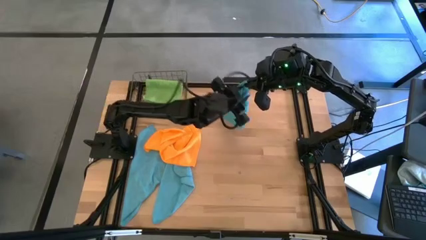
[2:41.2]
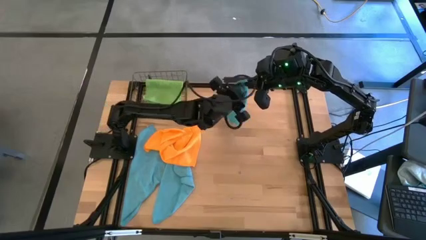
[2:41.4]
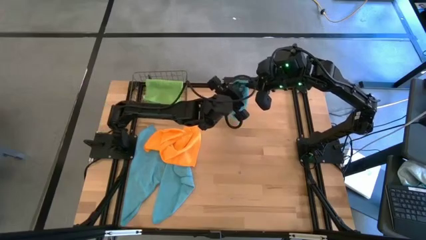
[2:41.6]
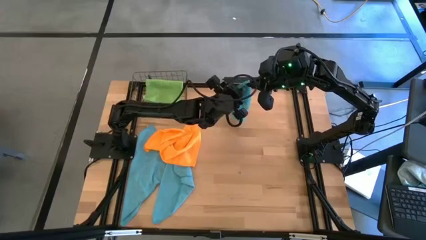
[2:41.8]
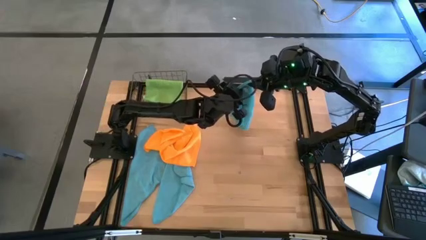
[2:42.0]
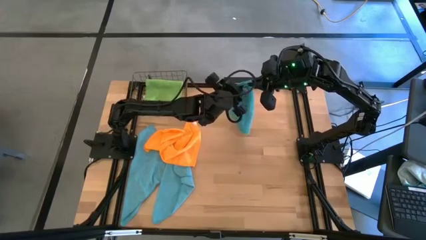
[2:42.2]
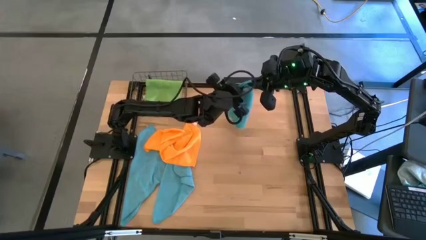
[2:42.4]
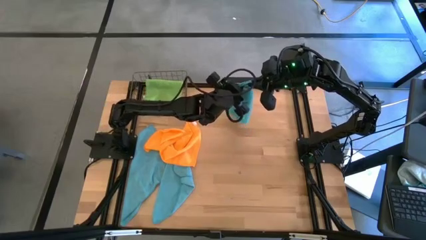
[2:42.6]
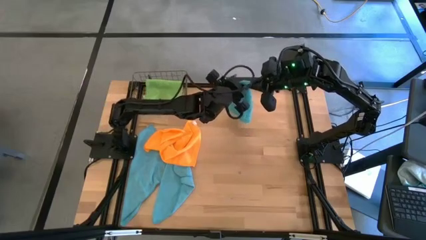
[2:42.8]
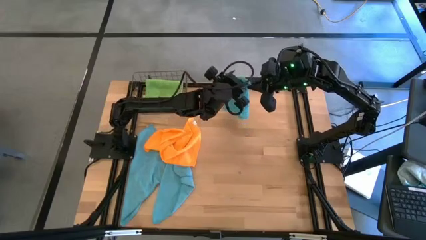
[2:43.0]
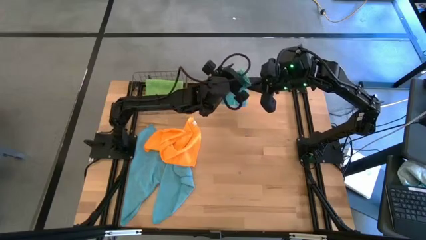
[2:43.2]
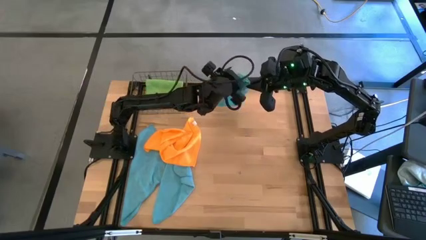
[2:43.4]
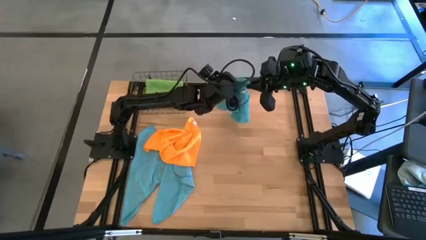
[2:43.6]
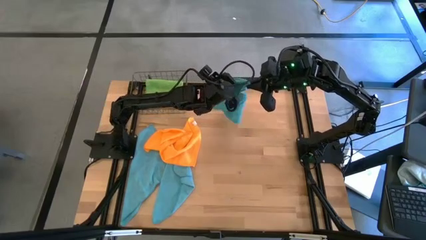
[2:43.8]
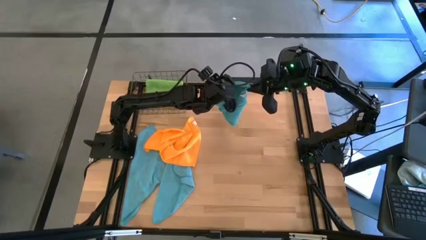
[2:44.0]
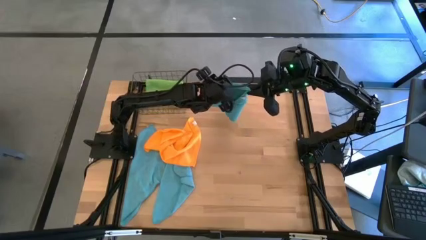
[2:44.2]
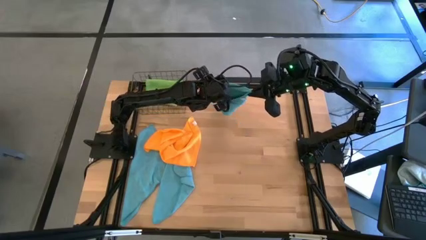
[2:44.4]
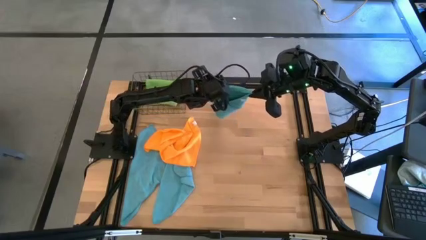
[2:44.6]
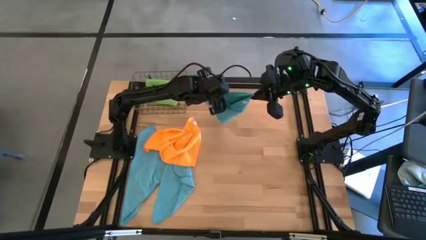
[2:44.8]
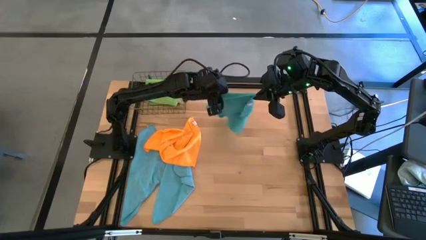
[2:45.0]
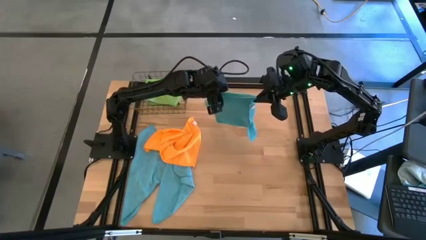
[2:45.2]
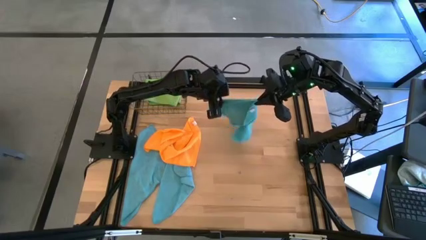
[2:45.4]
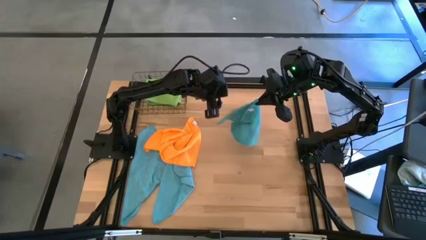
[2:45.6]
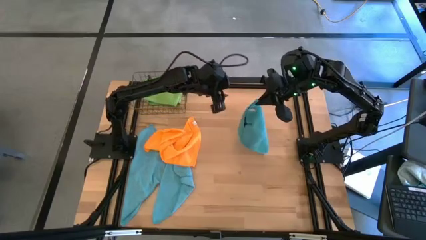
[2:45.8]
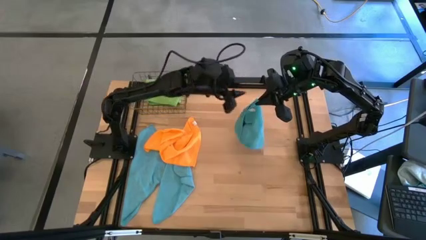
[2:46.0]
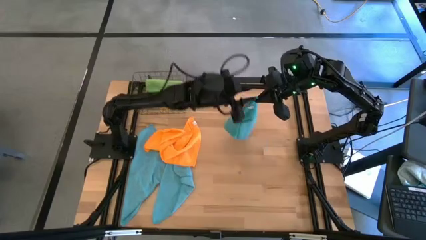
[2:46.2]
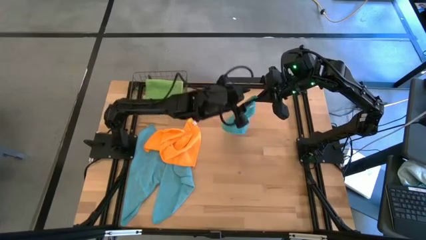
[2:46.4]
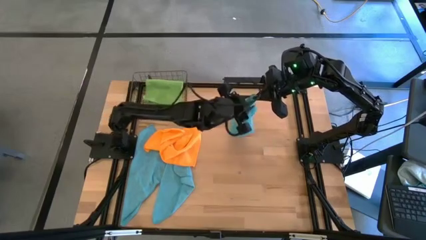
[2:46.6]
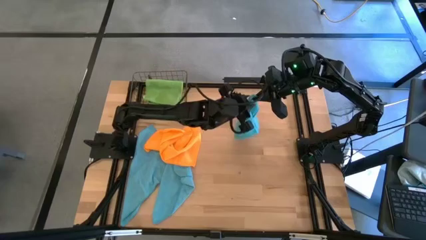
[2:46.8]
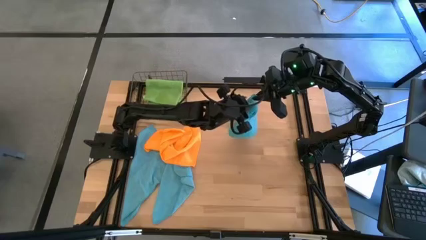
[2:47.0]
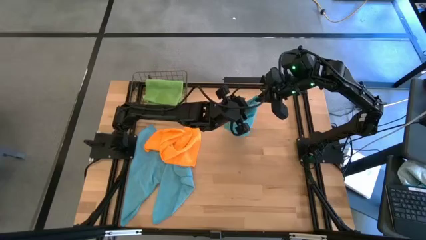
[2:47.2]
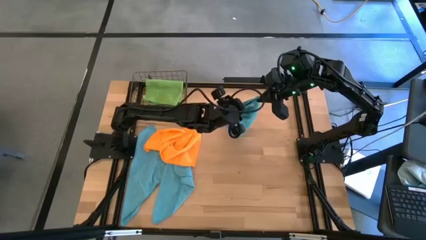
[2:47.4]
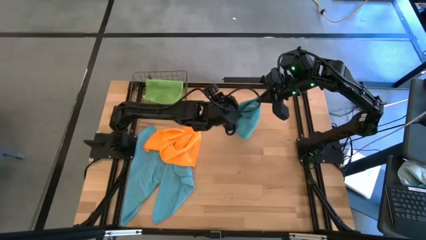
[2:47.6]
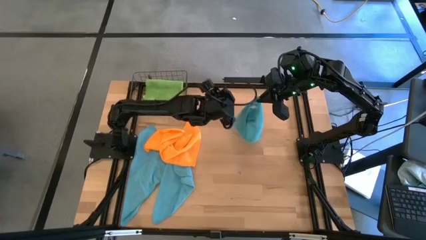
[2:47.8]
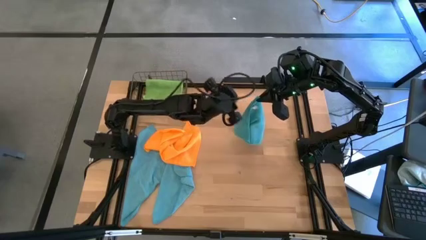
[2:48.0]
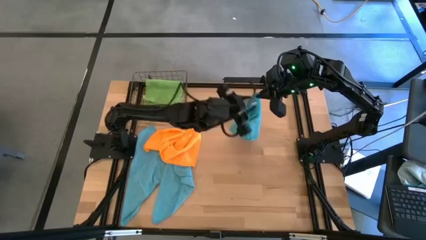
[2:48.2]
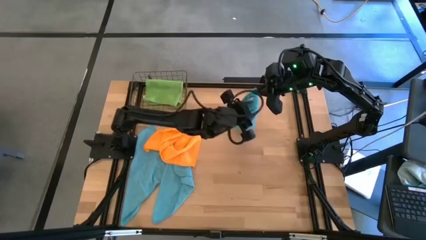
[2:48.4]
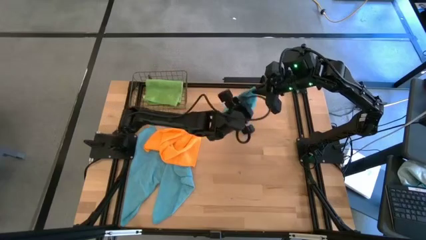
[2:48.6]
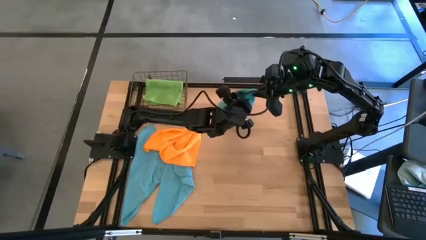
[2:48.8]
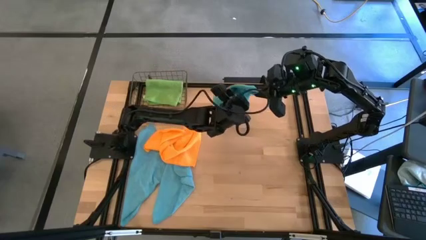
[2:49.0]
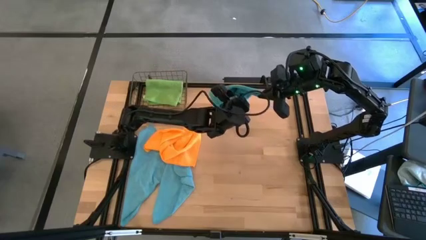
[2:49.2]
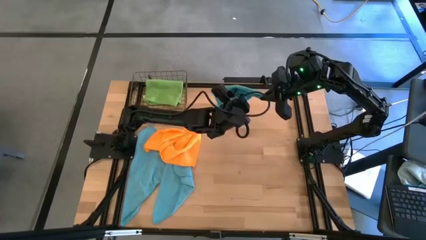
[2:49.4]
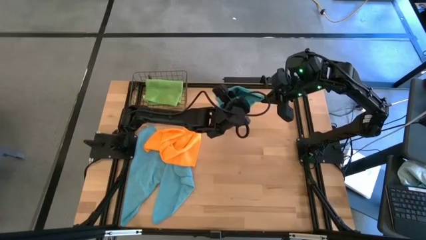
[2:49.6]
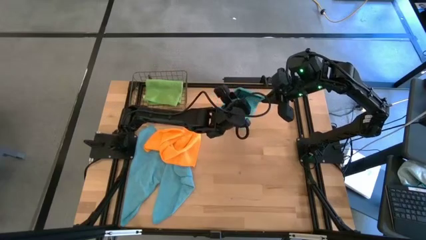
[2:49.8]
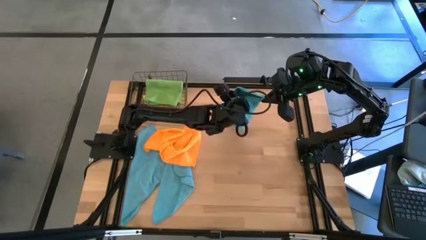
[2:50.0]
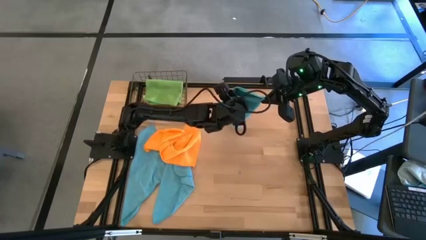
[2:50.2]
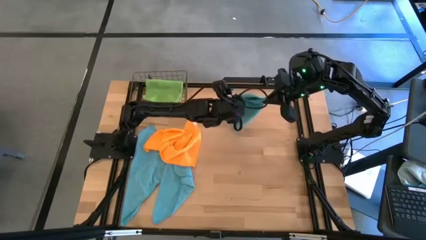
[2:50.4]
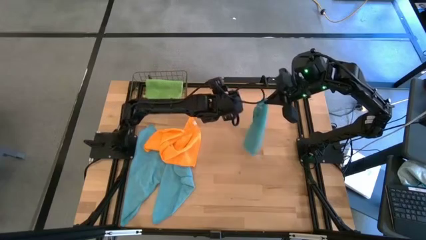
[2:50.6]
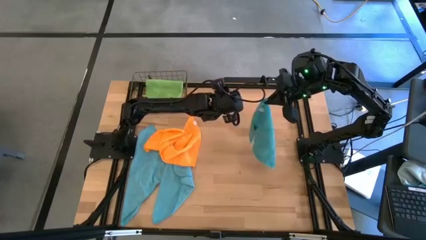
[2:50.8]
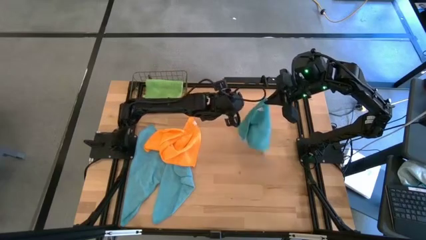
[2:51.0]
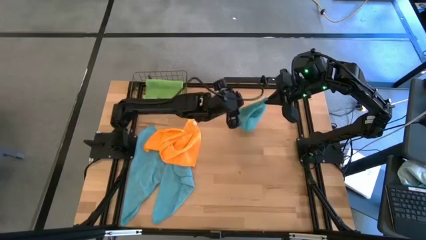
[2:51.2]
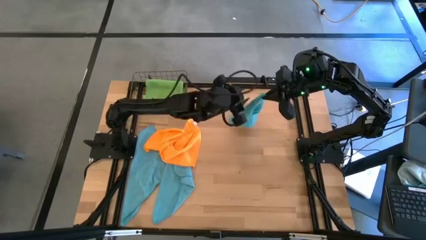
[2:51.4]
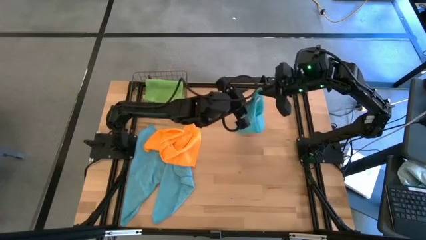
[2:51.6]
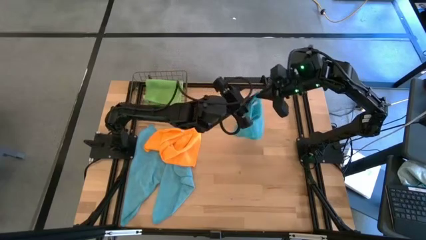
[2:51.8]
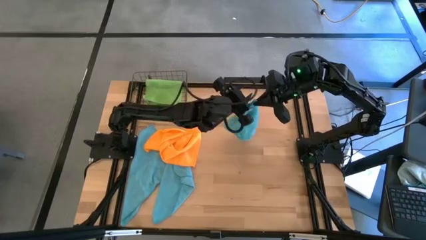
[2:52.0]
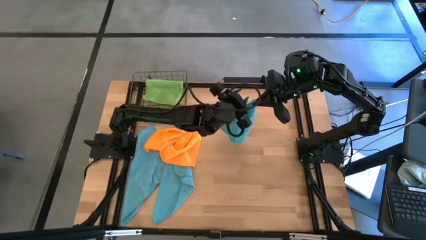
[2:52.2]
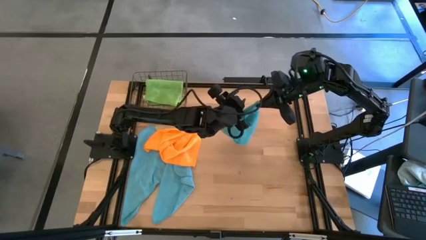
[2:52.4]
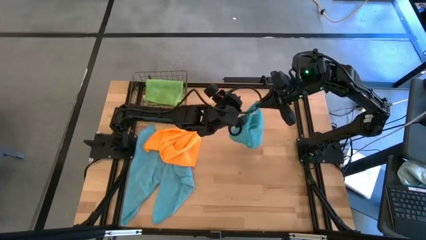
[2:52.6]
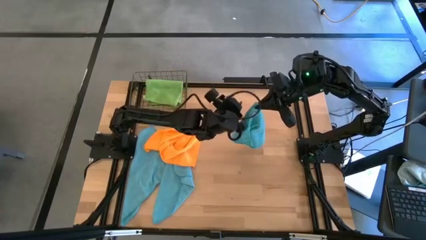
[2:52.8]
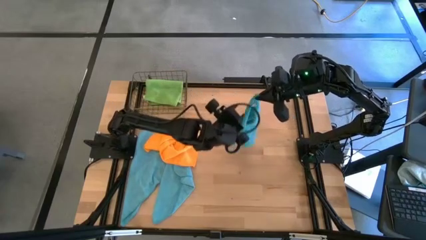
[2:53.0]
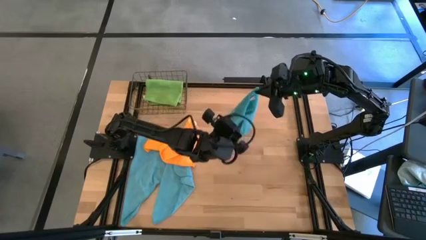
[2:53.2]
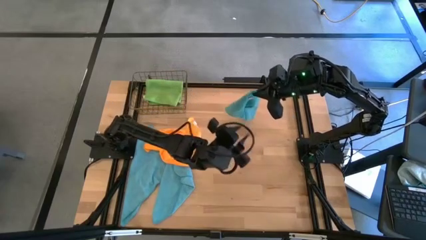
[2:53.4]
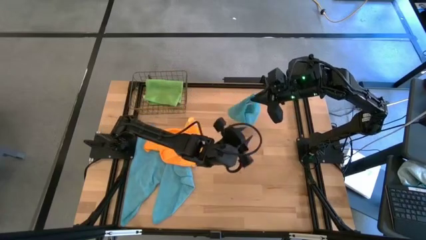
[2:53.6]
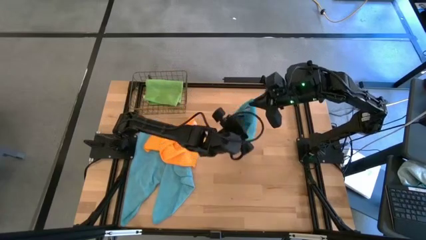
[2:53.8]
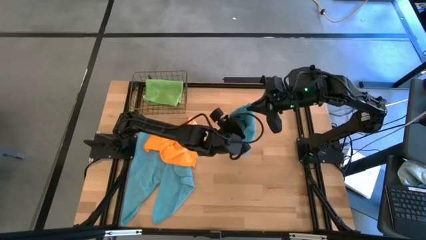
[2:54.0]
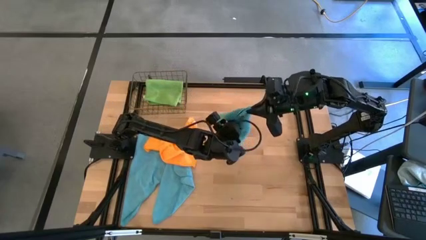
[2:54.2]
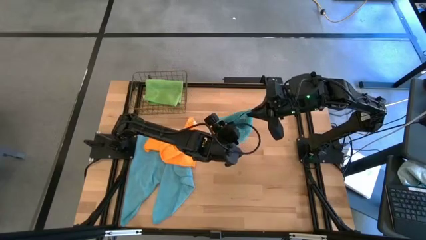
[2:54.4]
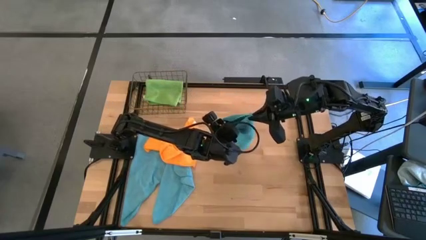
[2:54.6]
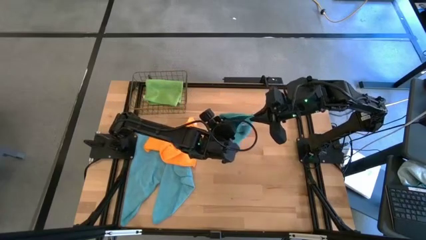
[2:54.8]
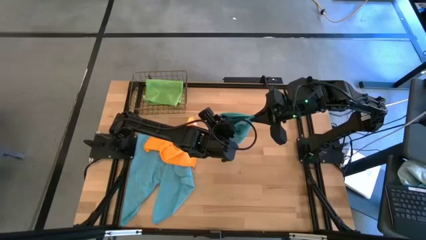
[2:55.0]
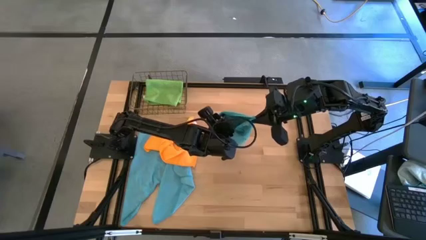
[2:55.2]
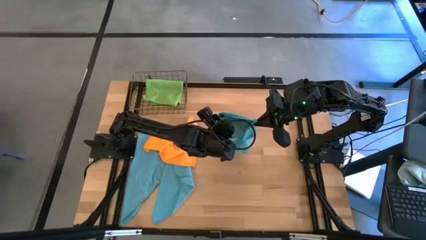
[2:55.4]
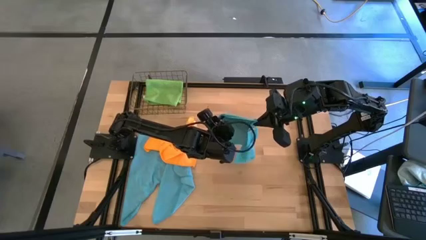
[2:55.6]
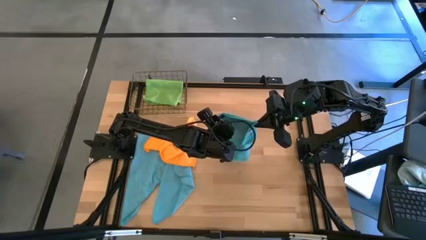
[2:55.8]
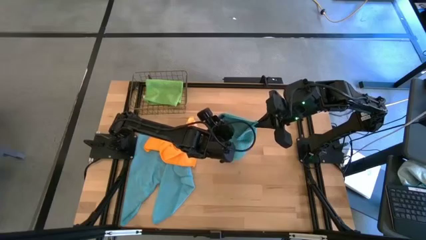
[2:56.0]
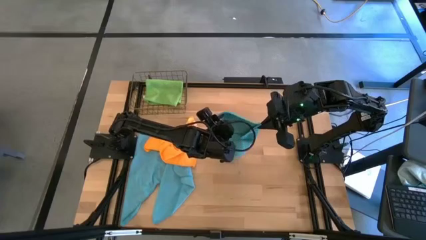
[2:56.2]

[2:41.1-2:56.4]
Task: Fold microfiber towels
Fold the blue microfiber cloth

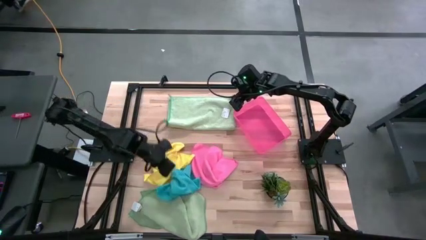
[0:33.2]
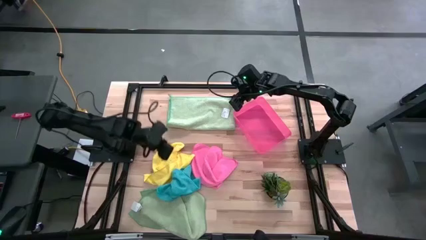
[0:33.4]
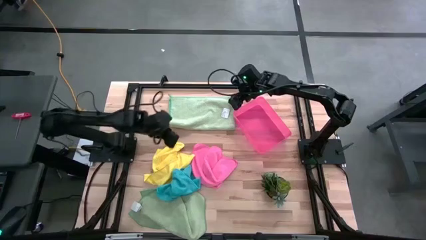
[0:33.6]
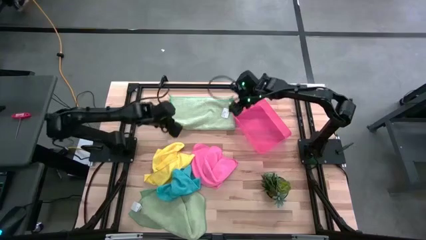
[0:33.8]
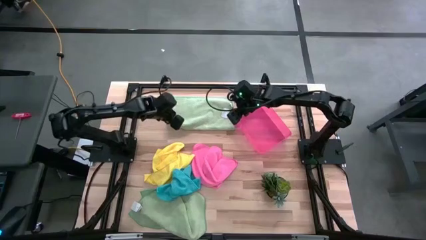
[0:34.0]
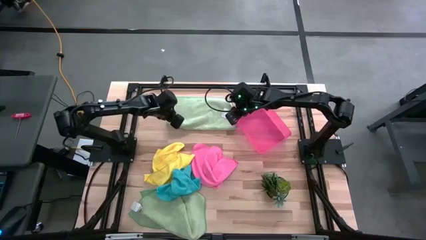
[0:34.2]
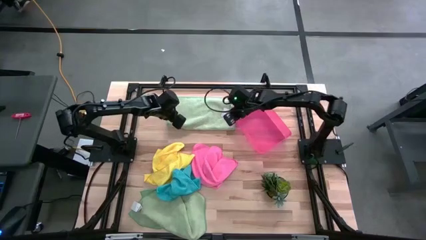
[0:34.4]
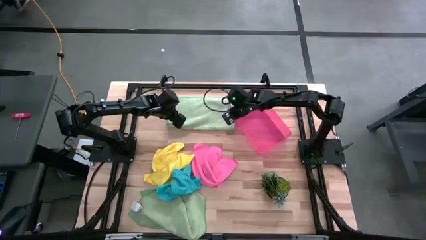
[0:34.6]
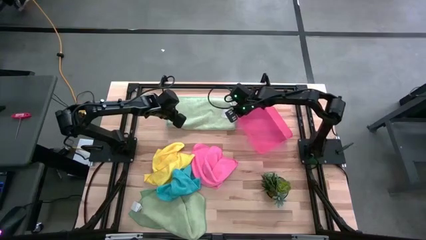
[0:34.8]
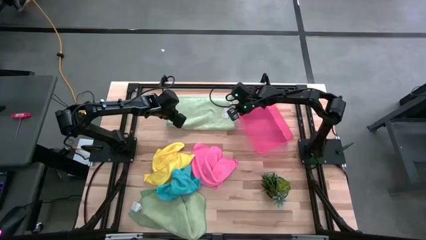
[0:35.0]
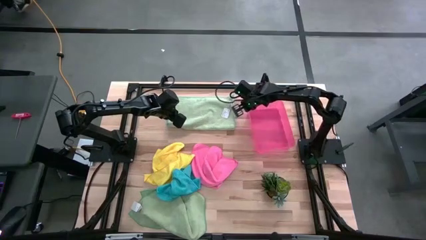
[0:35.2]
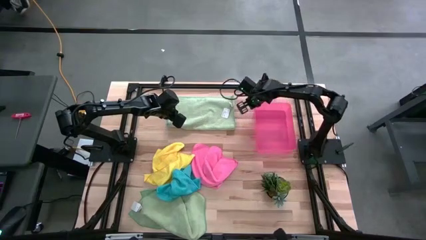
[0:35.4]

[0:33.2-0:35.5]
Task: Fold microfiber towels
Adjust the red bin on the table

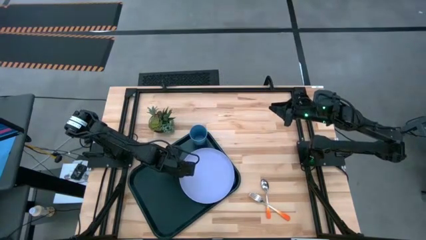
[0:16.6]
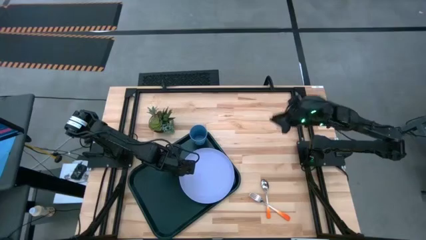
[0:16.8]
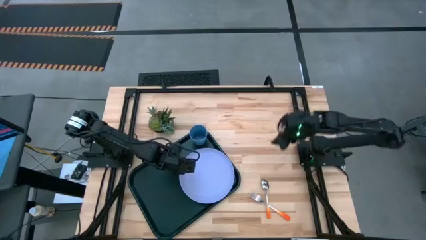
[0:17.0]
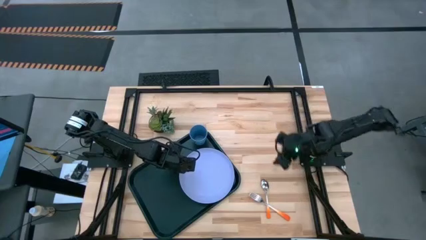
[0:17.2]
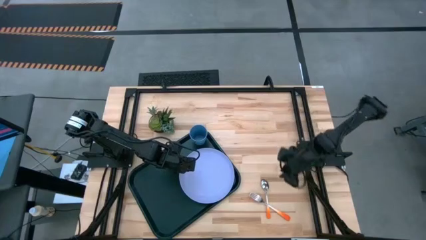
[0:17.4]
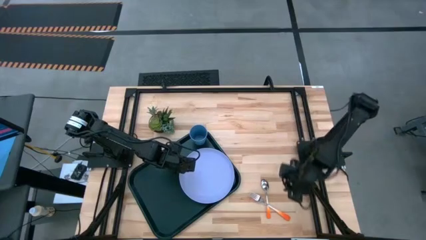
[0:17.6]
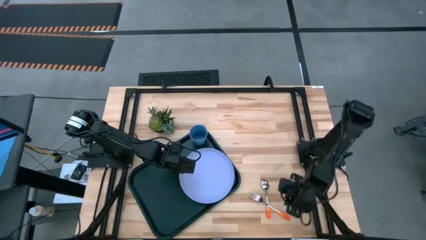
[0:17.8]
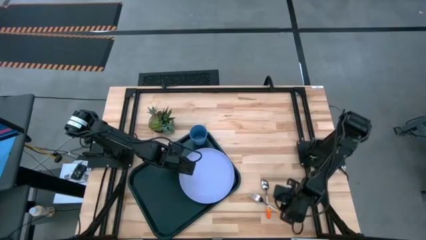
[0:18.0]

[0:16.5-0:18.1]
Task: Pick and place plate/cup/fork/spoon on tray
Put the orange fork on the black serving tray to the left of the purple plate
